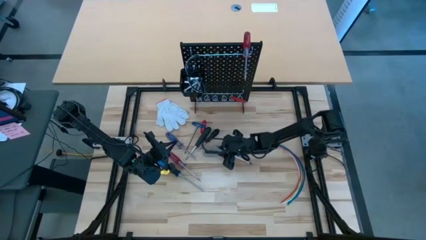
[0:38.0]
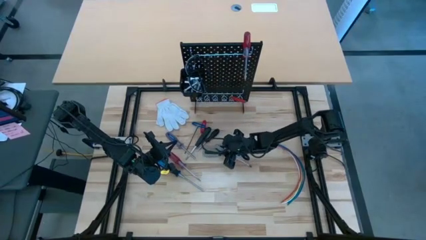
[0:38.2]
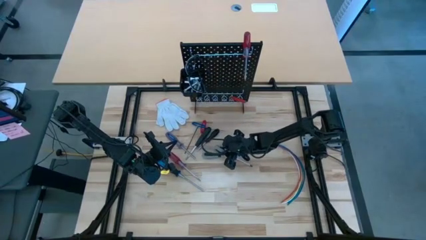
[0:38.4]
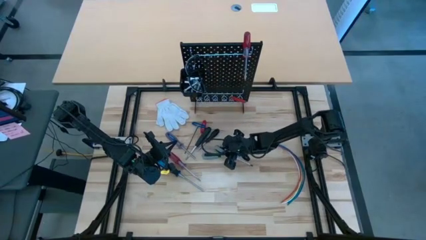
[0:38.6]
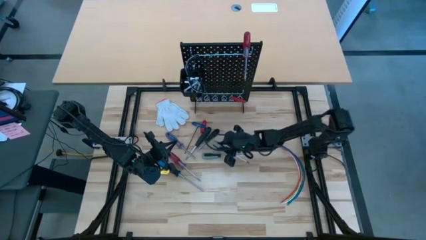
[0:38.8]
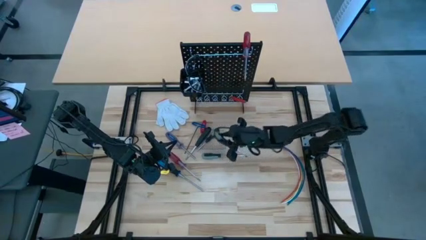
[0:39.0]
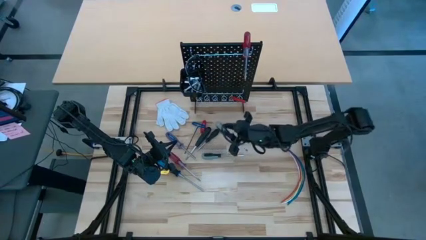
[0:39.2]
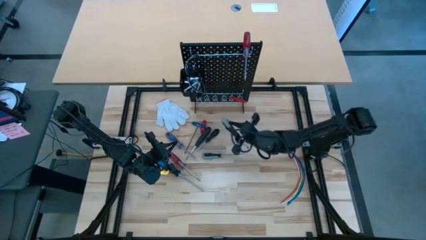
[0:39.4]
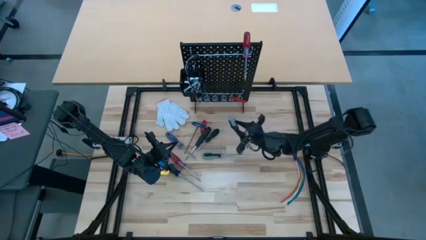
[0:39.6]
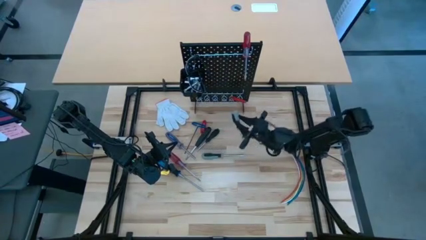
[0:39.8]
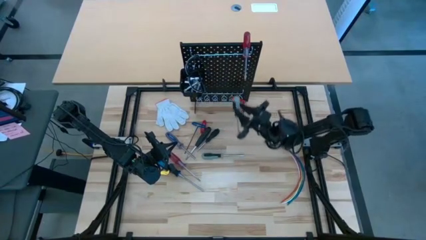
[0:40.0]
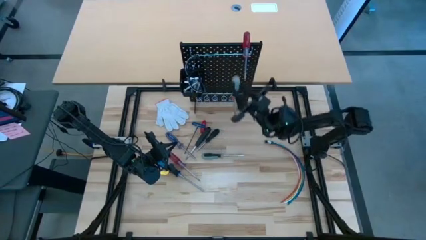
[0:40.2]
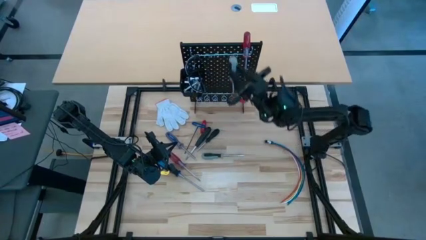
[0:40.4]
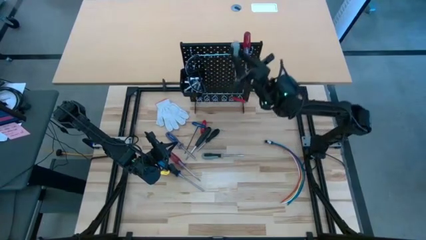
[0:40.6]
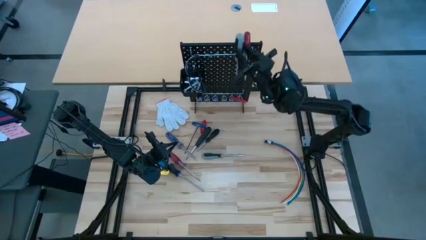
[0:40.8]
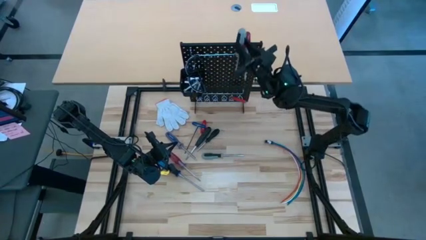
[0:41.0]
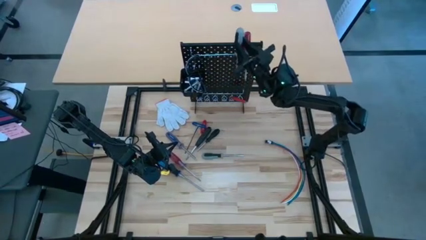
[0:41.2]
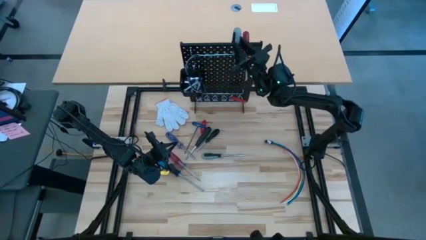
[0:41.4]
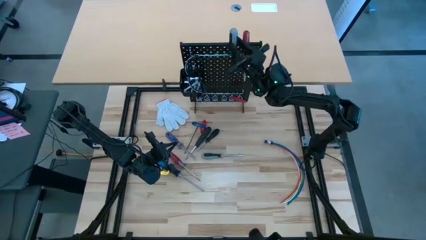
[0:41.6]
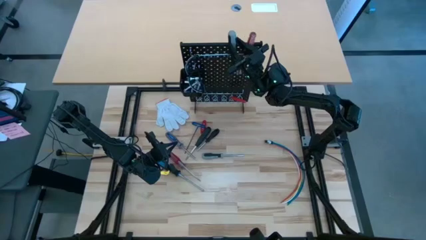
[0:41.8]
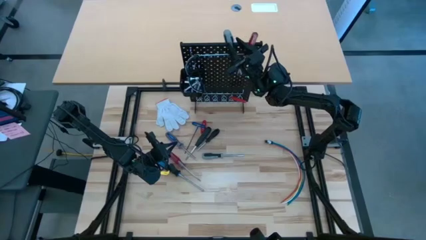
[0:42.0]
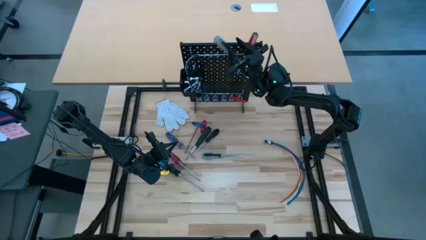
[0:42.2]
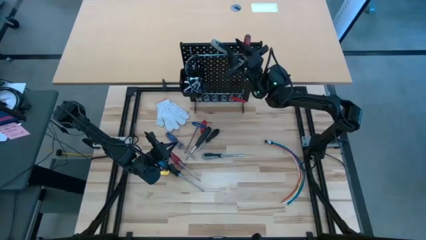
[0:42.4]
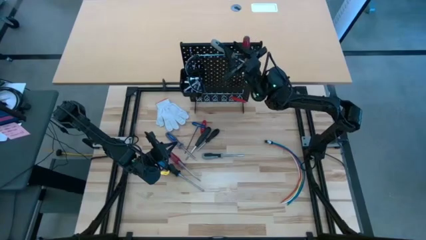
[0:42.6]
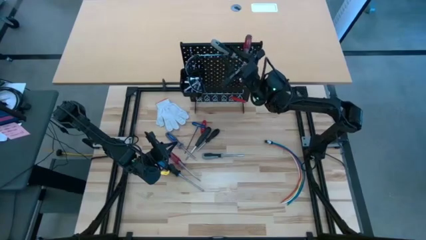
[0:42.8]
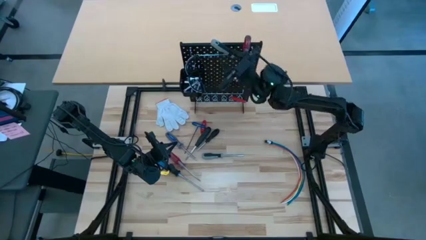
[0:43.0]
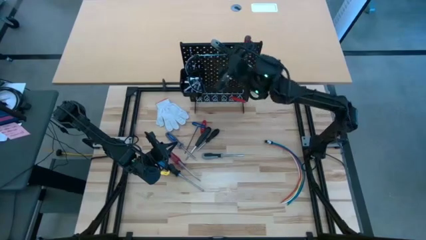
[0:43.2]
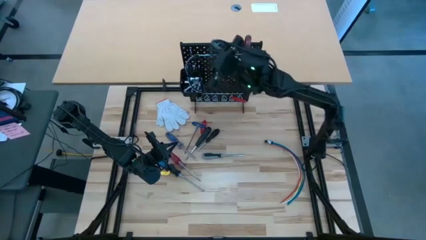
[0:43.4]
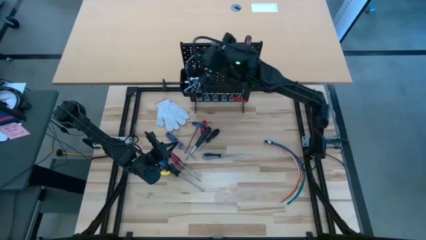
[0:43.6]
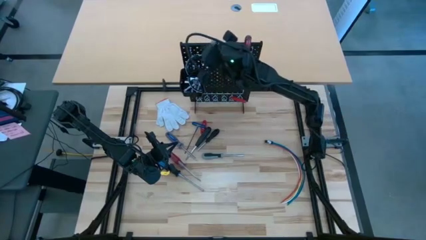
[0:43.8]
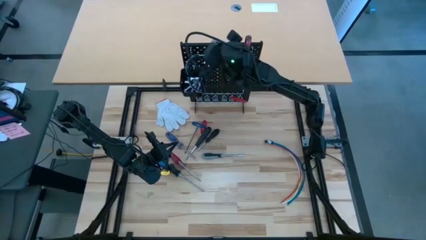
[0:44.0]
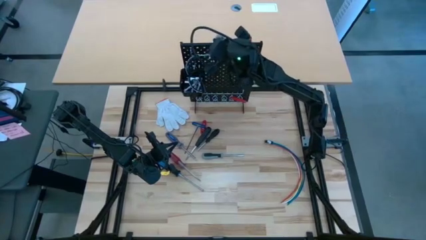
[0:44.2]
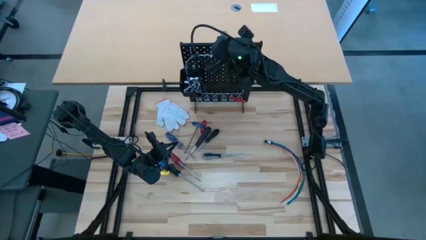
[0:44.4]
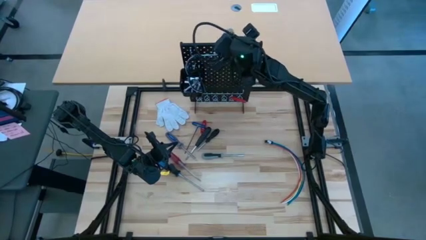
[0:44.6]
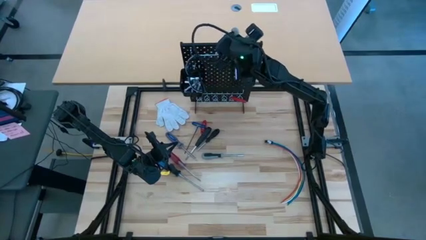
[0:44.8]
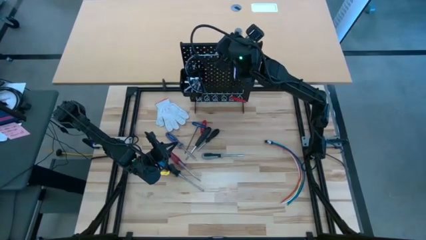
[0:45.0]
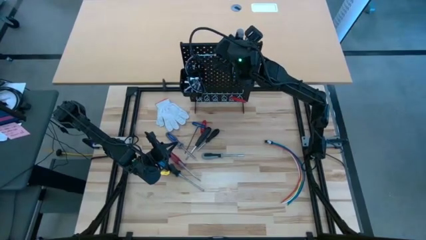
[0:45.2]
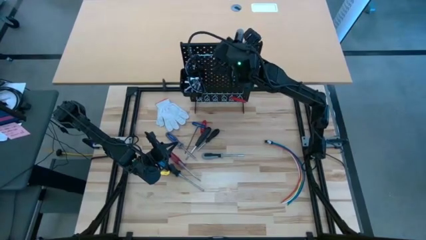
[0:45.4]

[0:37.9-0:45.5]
Task: Hang tools onto peg board
Hang the right grey screwdriver on the peg board

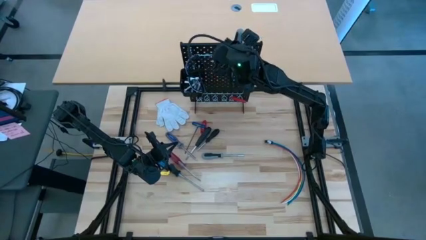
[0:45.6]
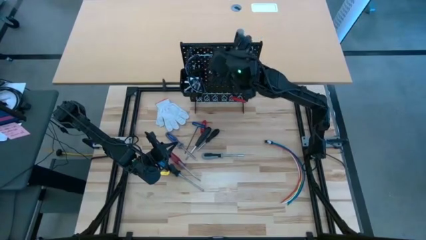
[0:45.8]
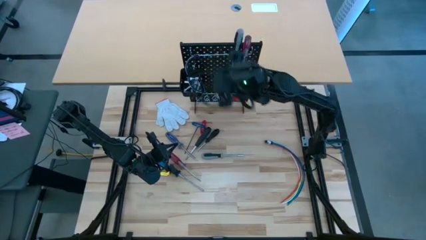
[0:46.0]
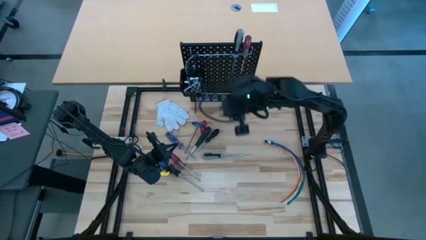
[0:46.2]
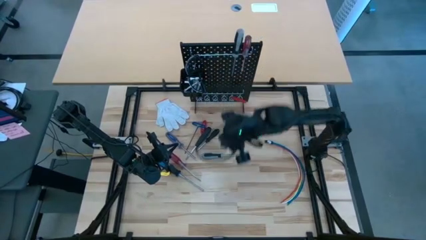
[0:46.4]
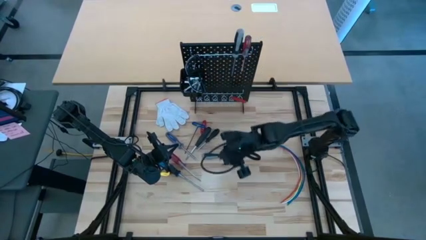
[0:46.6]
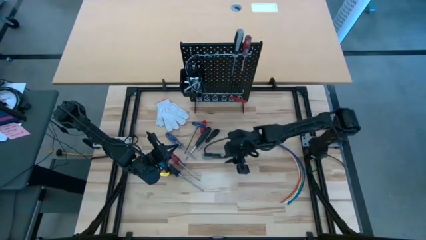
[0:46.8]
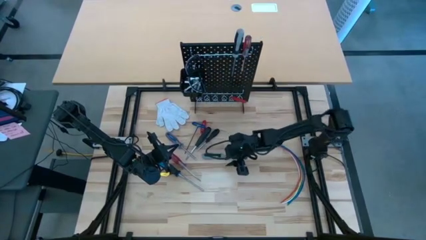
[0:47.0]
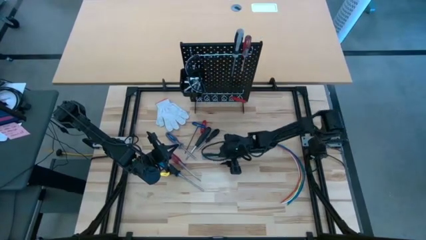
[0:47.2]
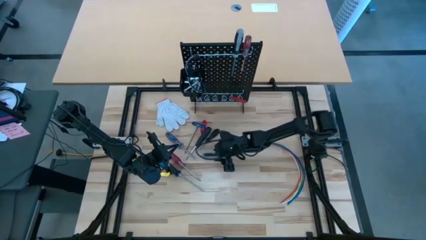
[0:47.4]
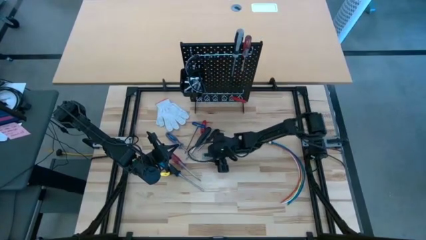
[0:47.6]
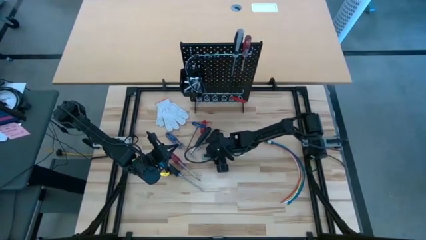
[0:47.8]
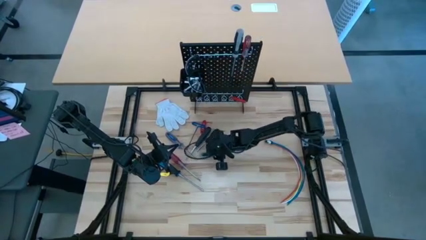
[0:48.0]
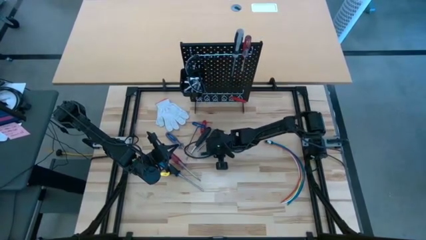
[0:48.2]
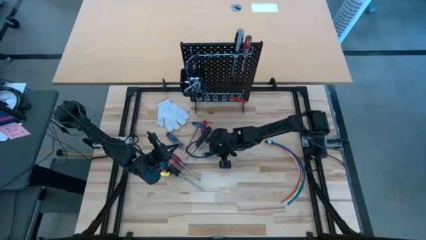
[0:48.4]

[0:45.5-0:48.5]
Hang the grey screwdriver on the pegboard

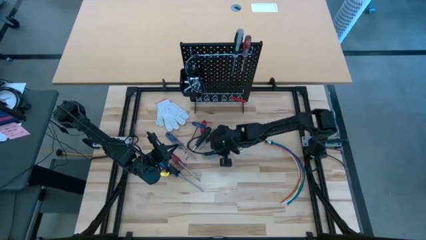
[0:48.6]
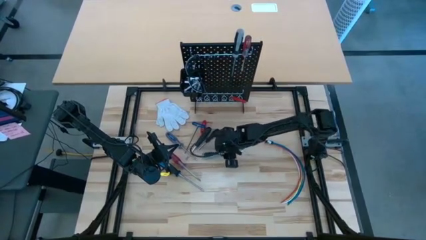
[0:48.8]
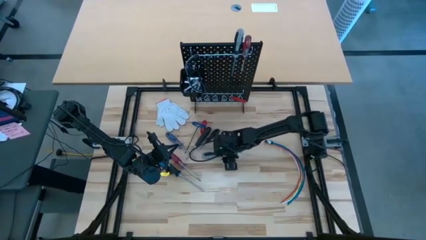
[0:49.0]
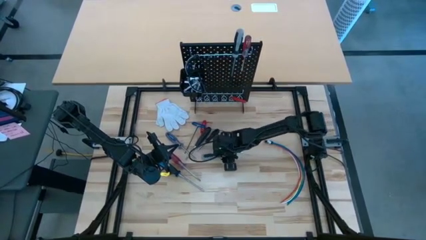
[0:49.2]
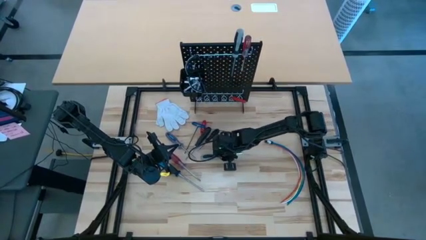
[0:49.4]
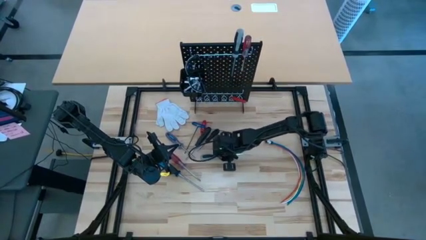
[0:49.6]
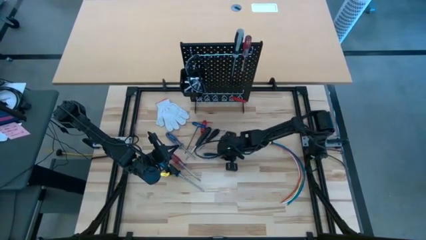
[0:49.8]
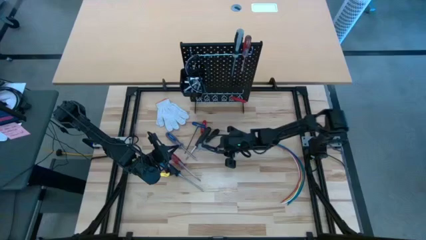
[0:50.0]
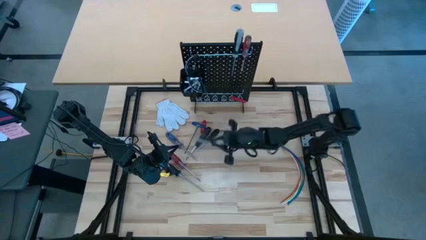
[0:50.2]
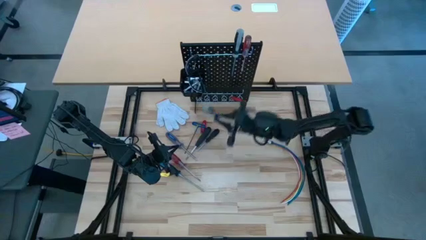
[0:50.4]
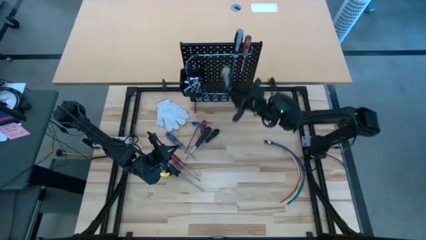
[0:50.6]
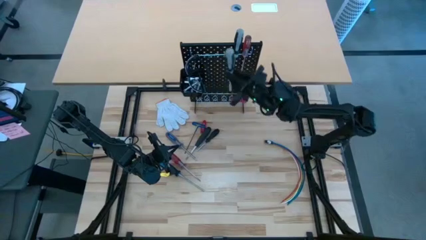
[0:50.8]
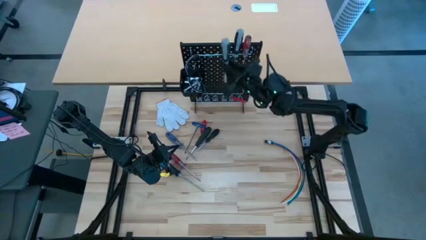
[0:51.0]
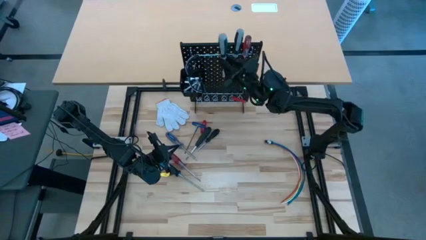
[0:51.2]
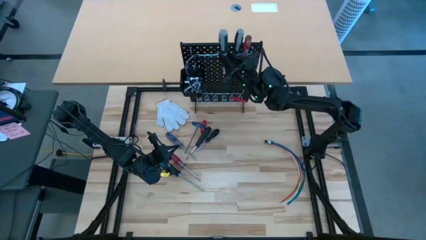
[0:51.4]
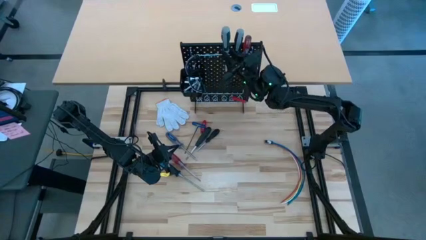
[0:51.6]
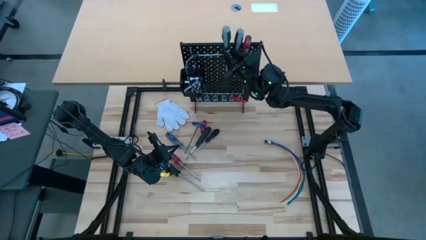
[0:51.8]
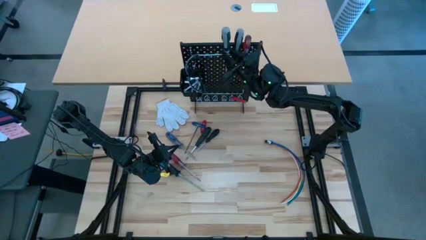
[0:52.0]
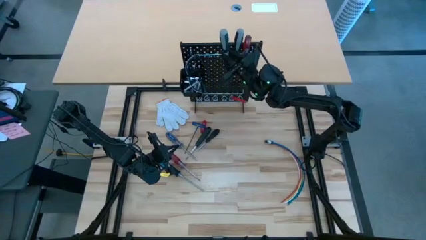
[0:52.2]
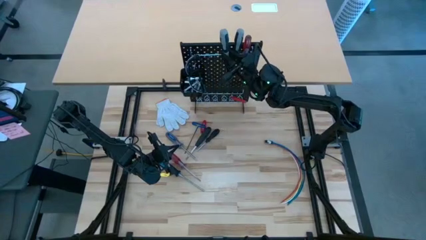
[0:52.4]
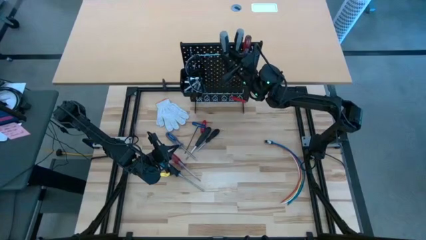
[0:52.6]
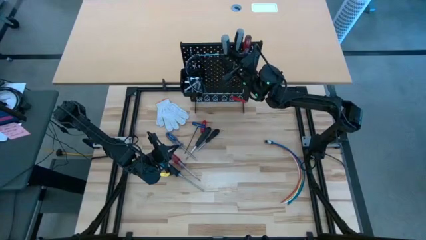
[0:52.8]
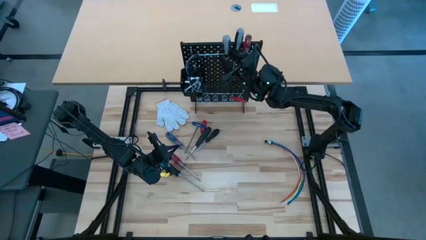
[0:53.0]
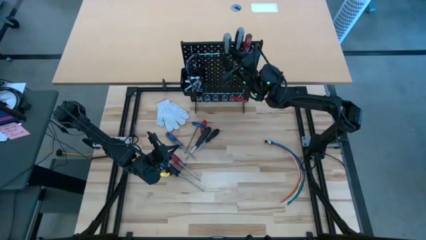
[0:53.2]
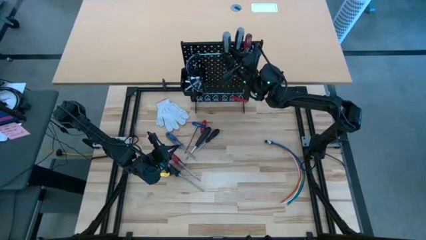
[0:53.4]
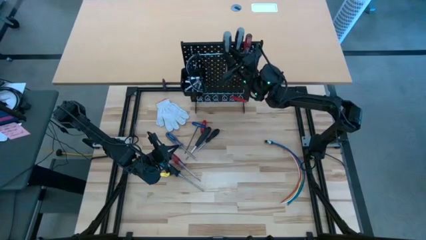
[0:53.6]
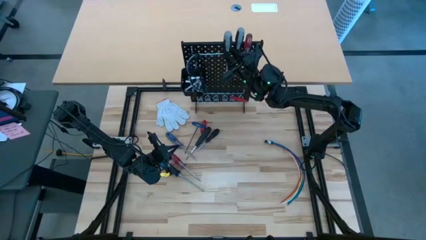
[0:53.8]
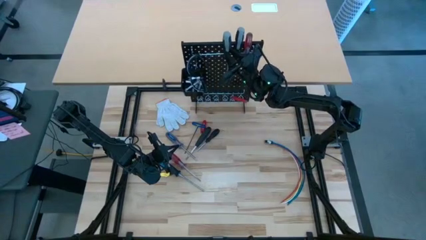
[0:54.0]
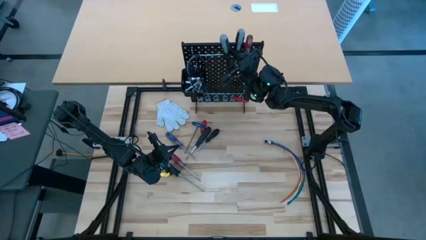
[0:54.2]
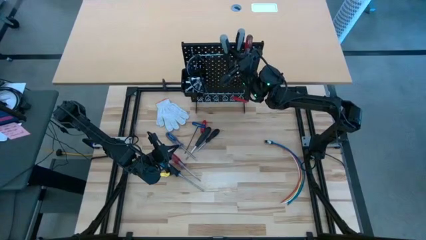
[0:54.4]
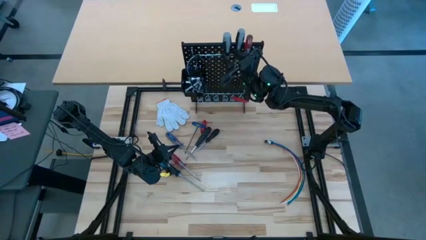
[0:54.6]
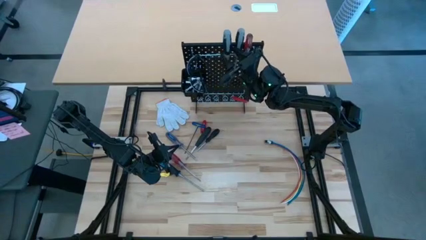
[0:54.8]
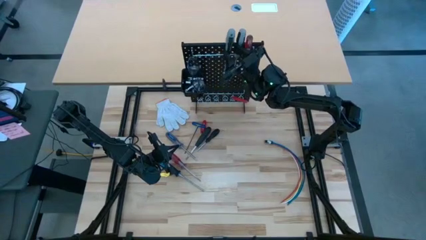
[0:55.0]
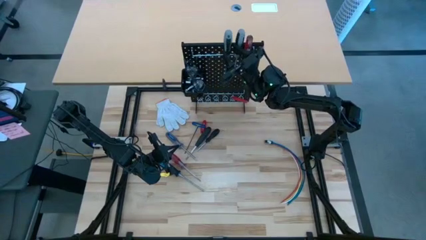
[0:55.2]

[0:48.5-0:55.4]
Hang the grey screwdriver in the pegboard
